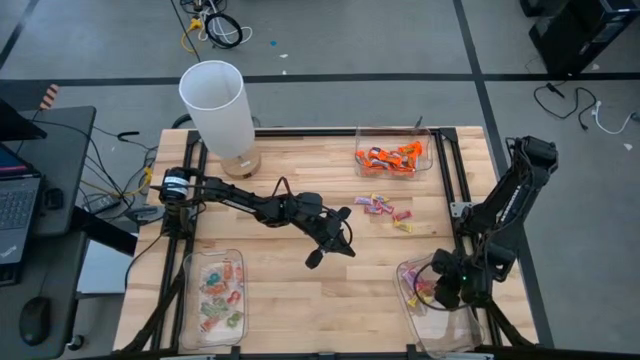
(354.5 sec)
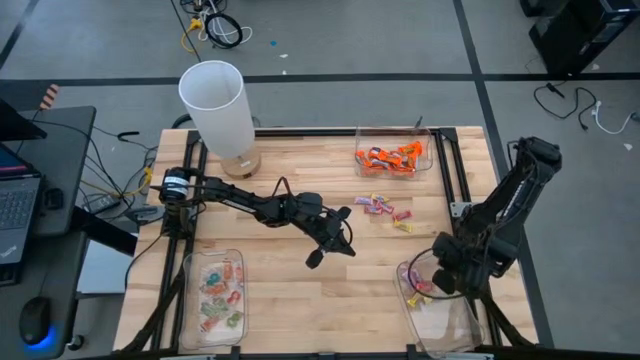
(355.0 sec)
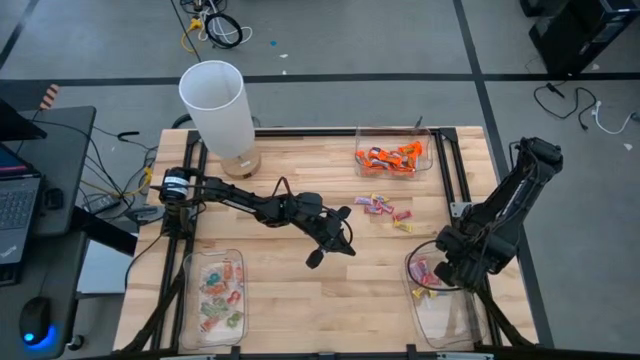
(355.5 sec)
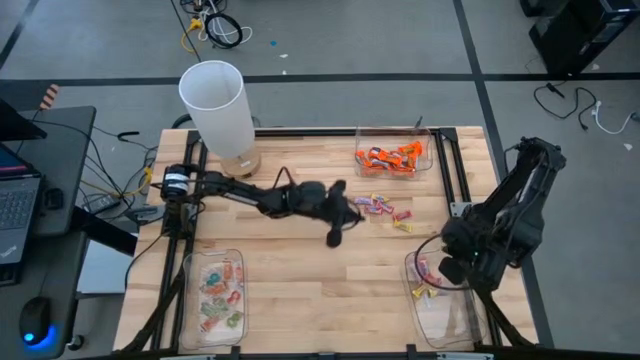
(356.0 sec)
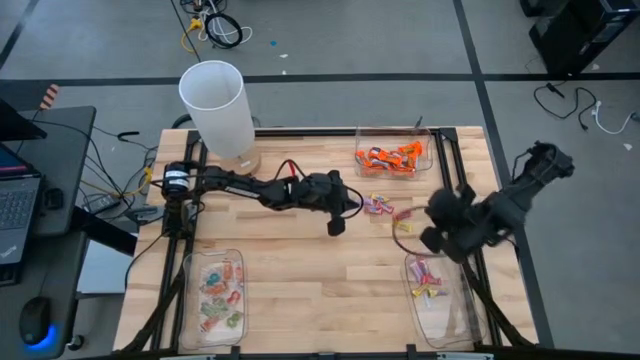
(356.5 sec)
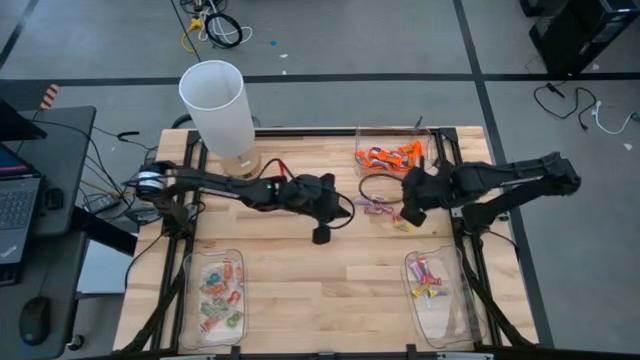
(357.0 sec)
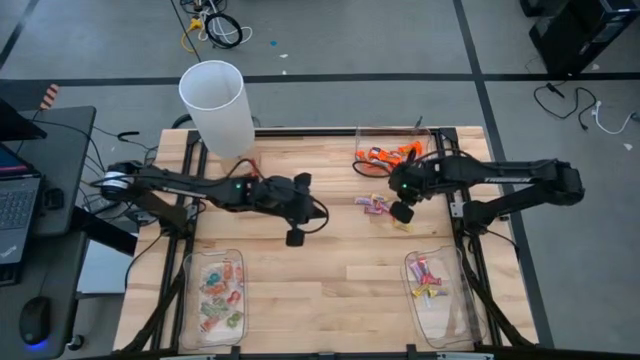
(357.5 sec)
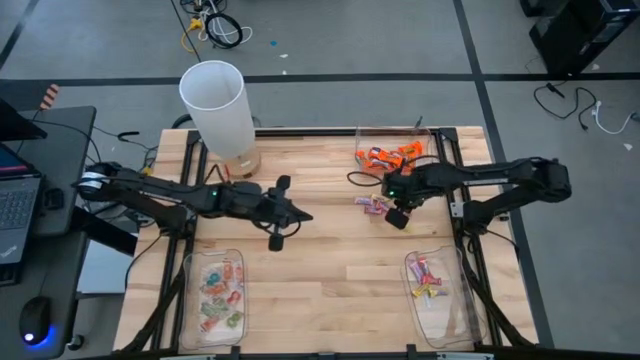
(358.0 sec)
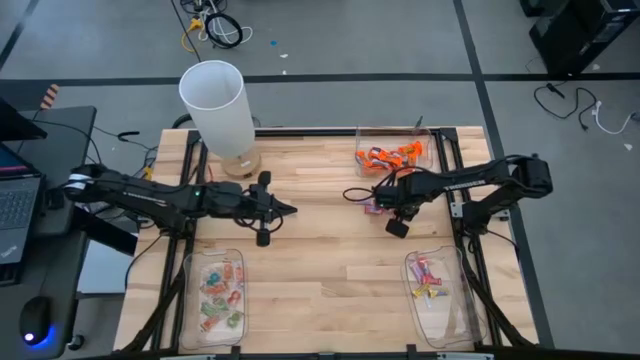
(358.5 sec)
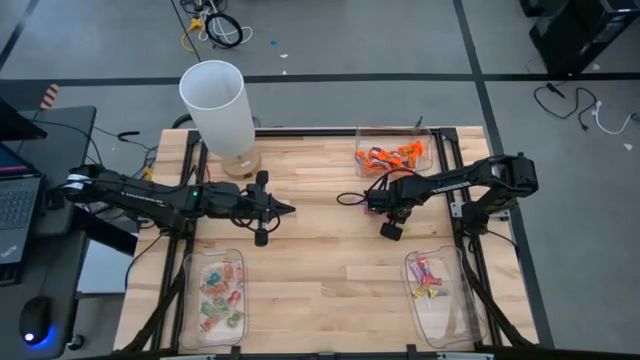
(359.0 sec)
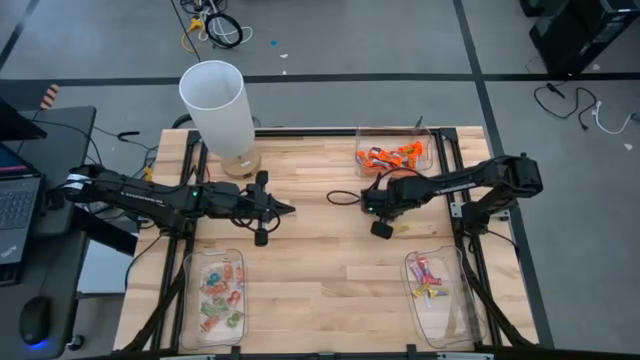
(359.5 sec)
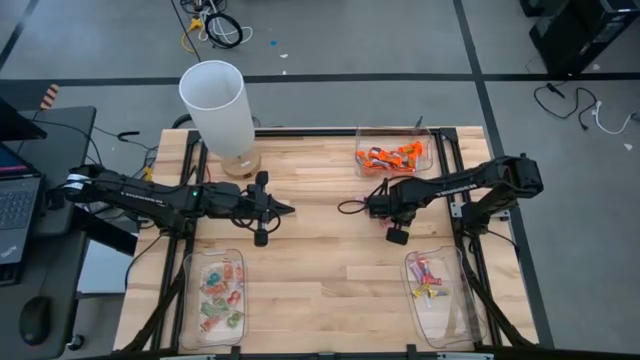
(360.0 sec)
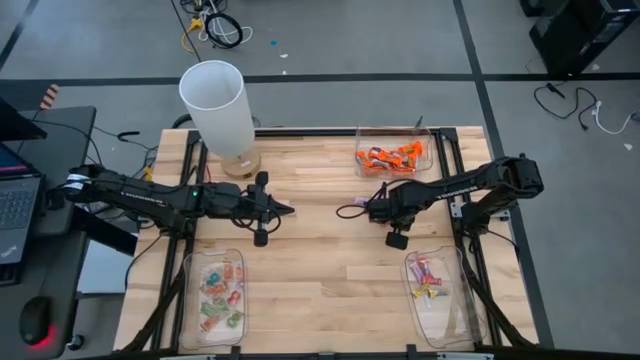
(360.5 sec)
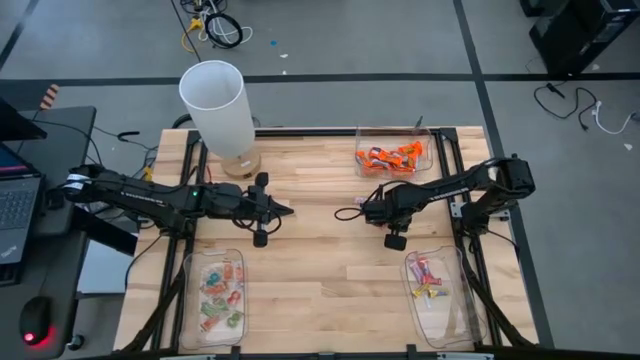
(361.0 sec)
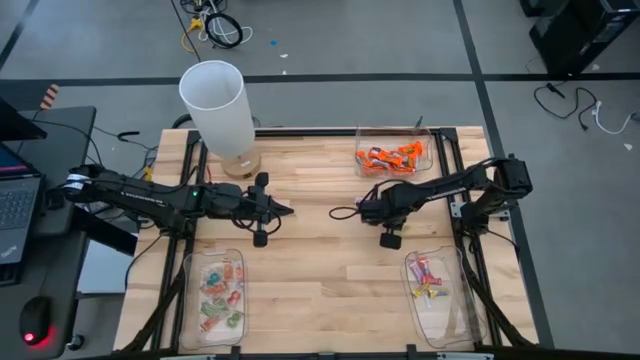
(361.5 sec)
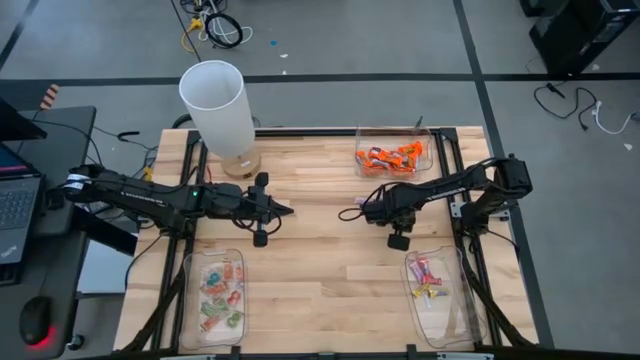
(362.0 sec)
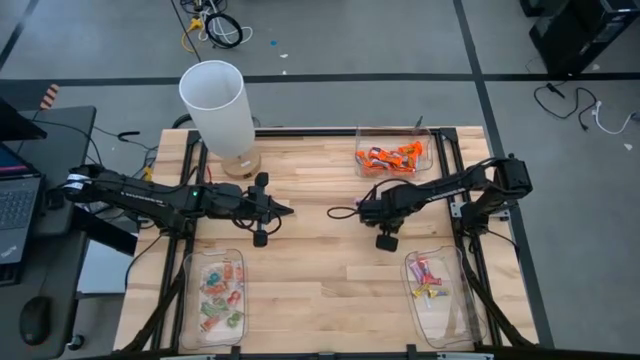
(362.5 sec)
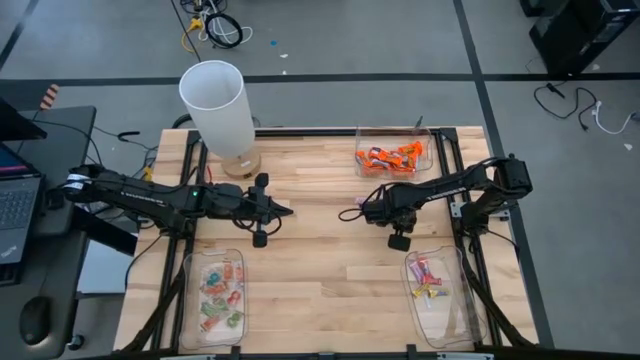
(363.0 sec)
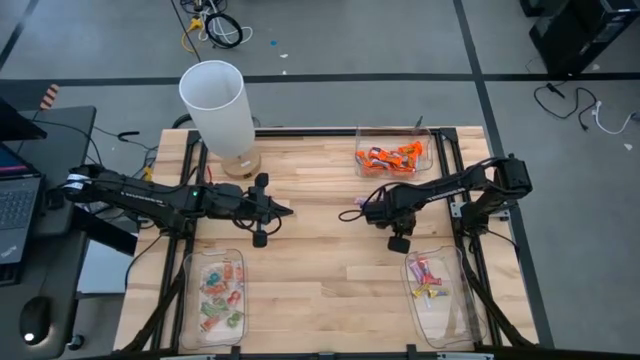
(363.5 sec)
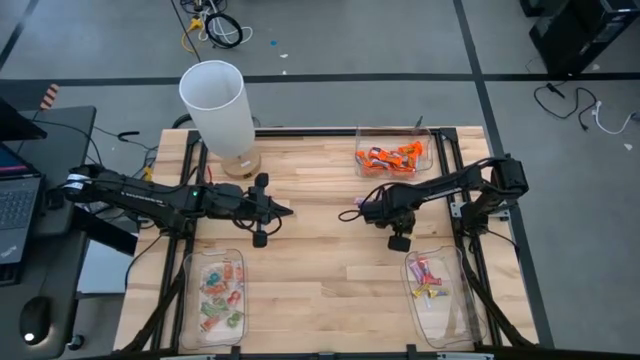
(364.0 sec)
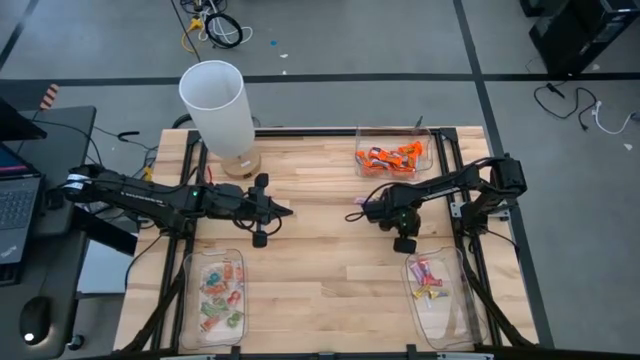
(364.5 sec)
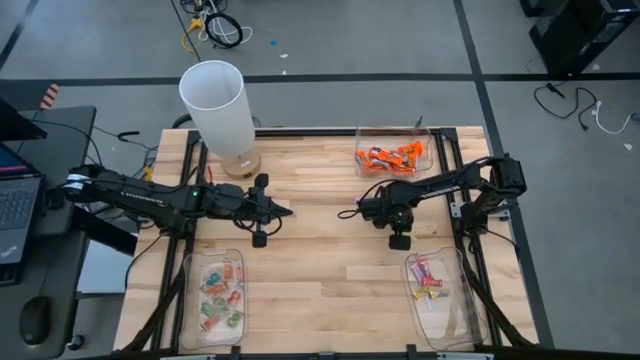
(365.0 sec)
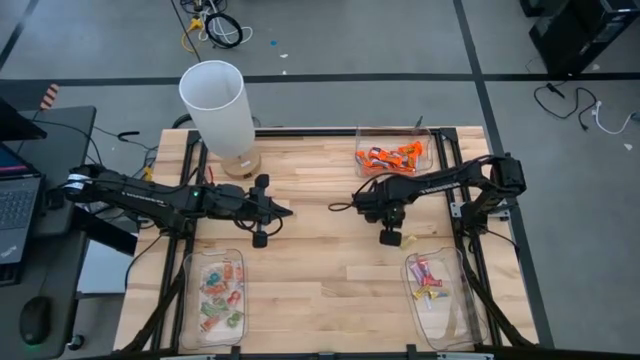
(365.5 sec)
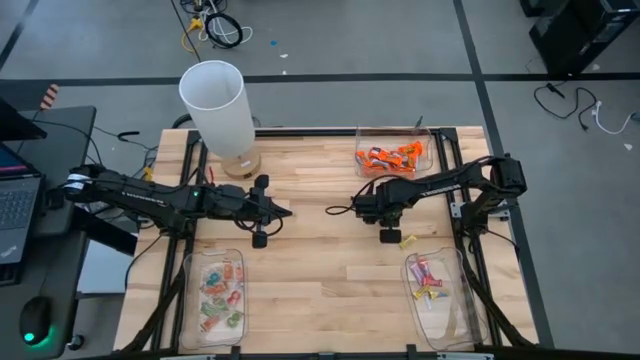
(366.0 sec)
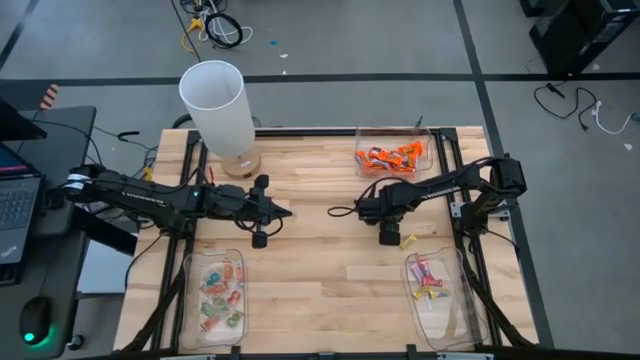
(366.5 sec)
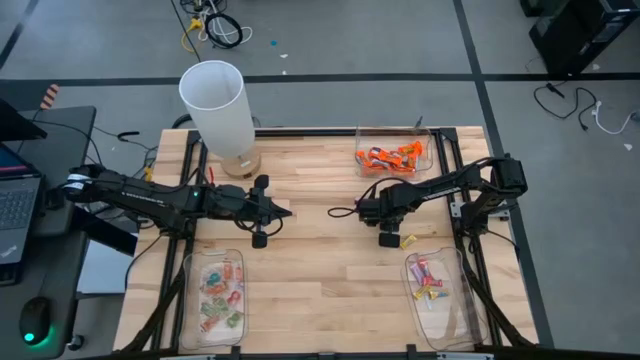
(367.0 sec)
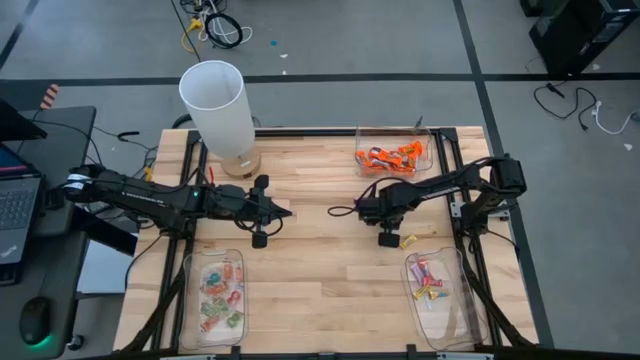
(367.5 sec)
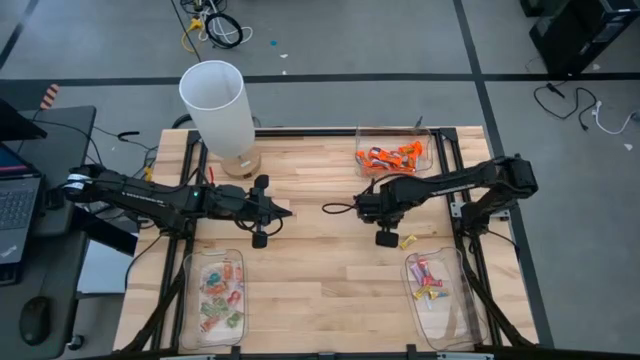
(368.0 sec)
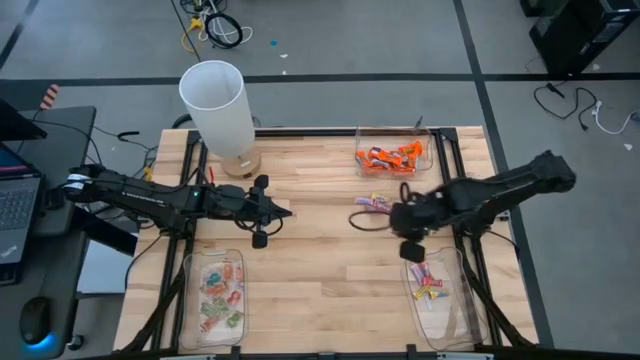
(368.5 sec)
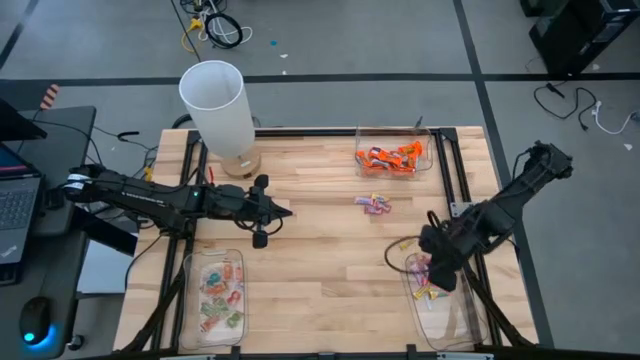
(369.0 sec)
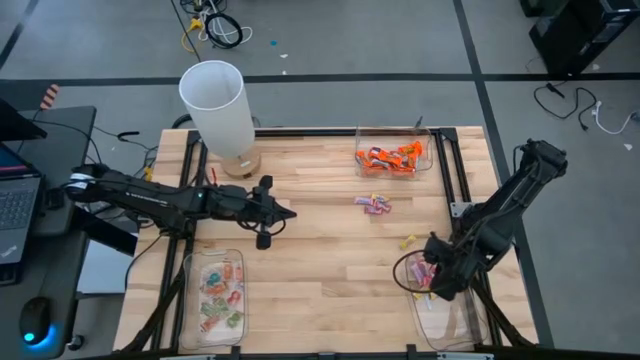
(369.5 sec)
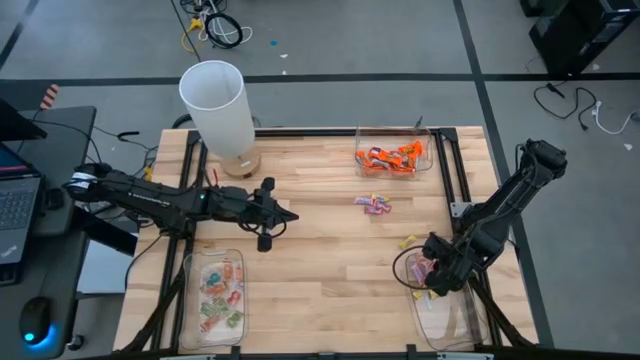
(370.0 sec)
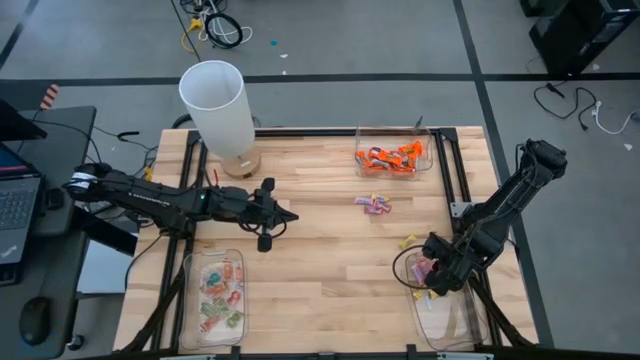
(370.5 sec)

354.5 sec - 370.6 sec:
Task: Sort candy
Put the red candy into the bottom right transparent bin

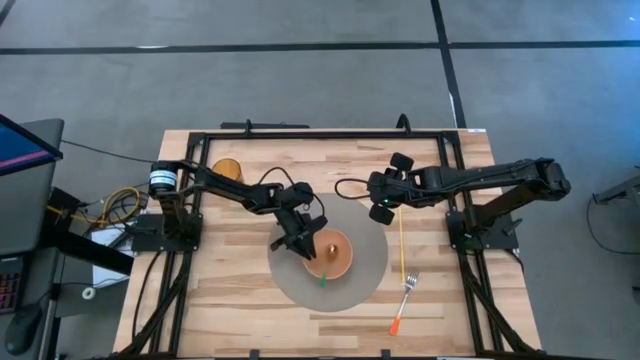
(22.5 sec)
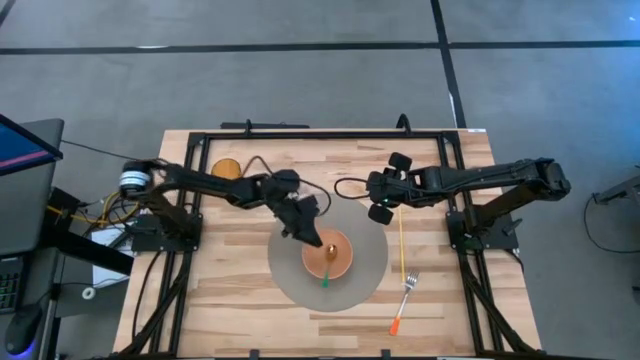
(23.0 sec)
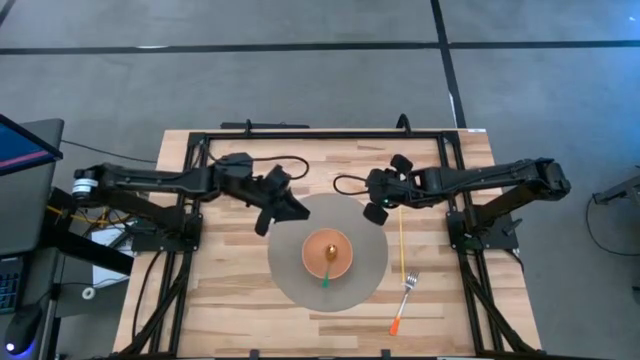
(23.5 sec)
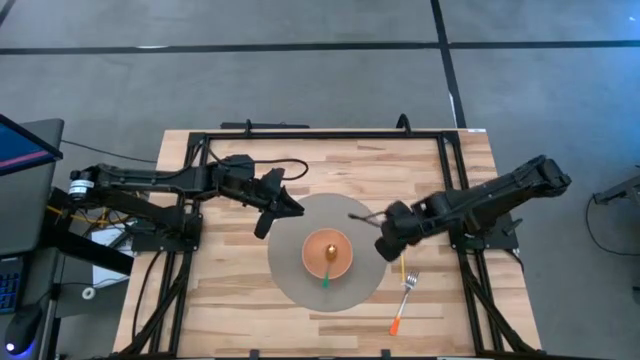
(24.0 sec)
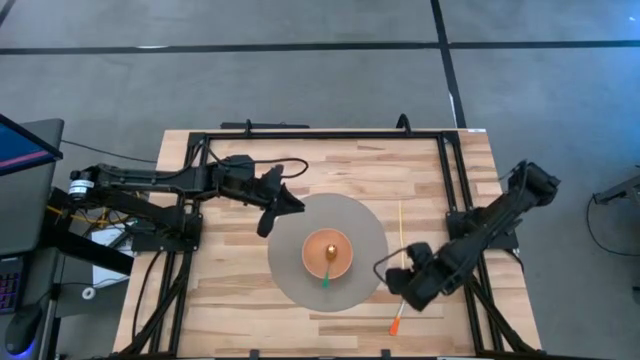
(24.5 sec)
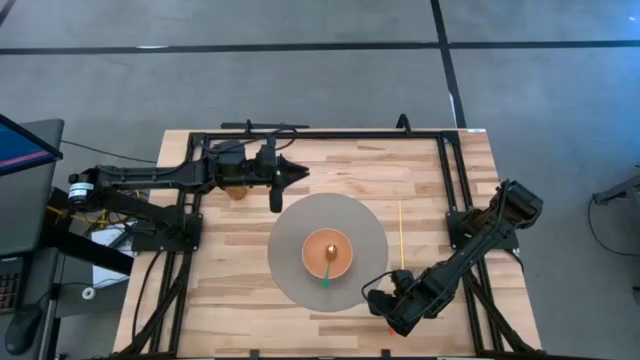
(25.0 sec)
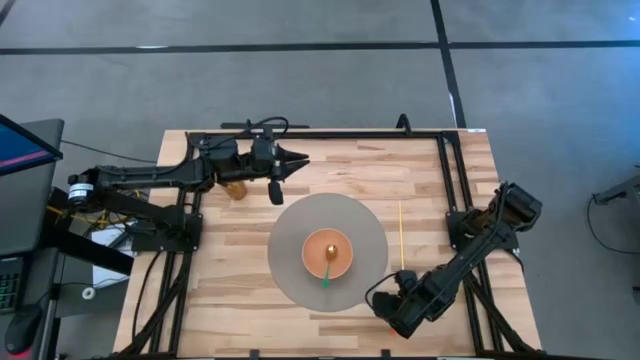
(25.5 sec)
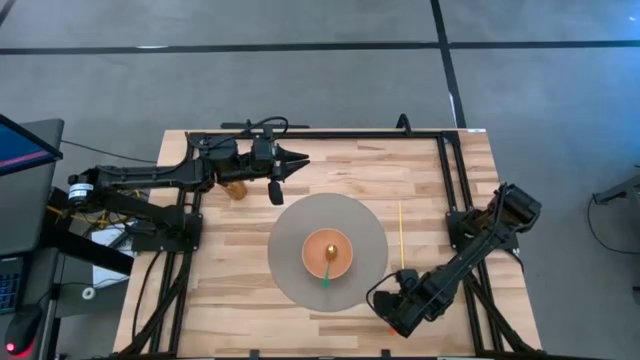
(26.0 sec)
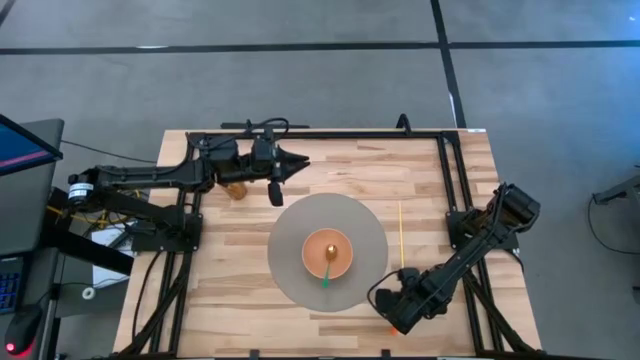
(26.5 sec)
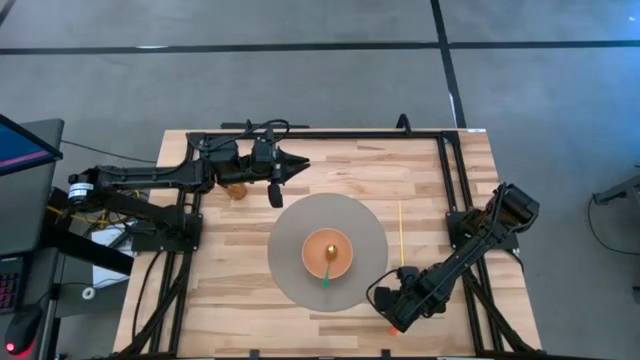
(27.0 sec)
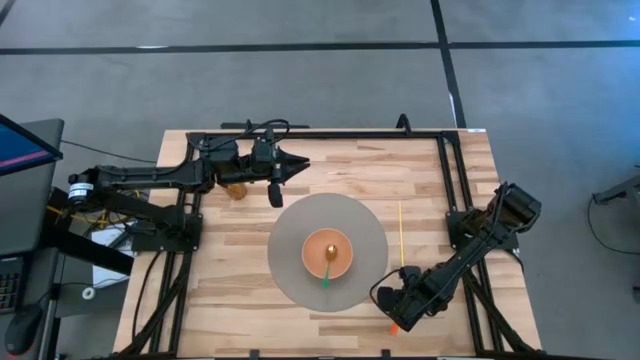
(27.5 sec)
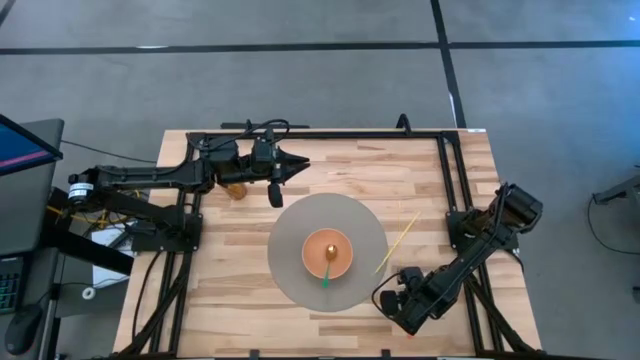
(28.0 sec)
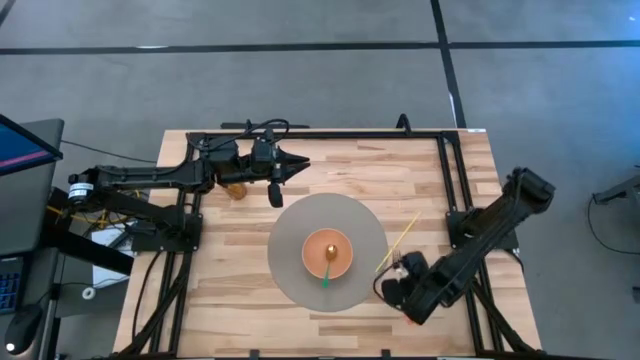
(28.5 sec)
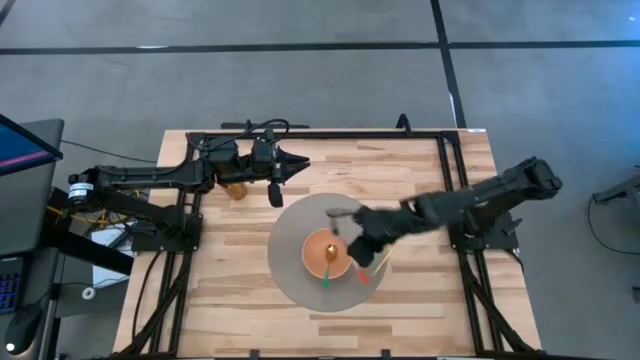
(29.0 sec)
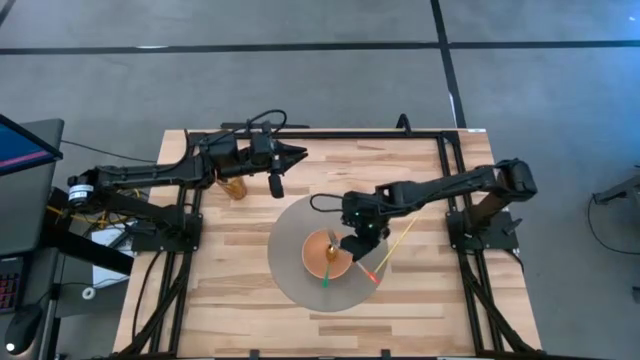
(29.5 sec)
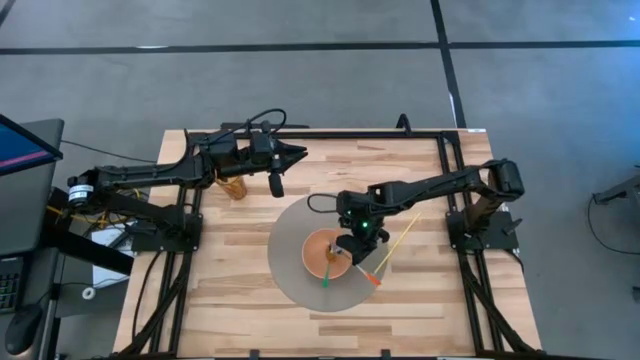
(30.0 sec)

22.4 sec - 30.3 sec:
Task: Pick & Place Utensil
Put the orange fork into the pink bowl
